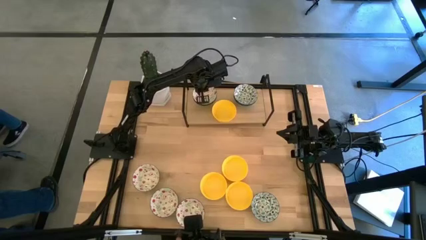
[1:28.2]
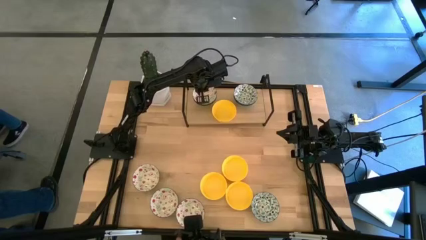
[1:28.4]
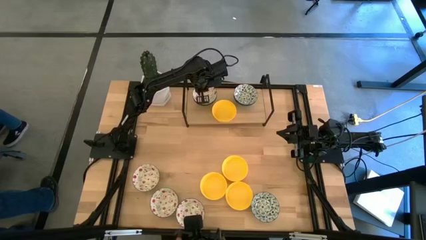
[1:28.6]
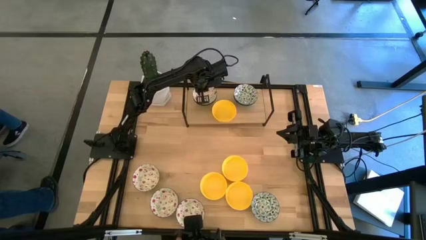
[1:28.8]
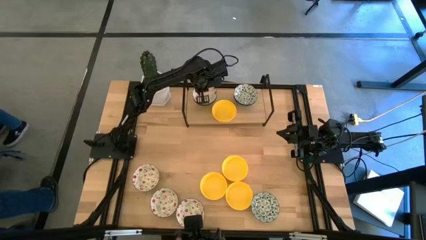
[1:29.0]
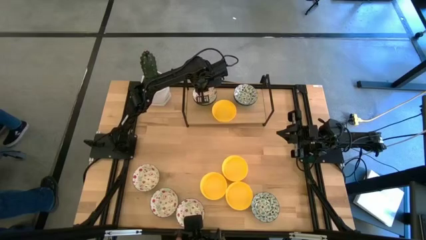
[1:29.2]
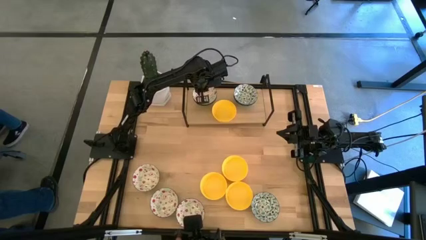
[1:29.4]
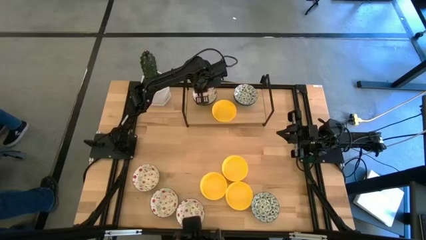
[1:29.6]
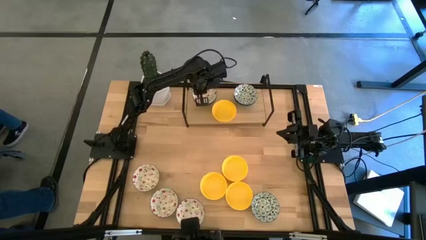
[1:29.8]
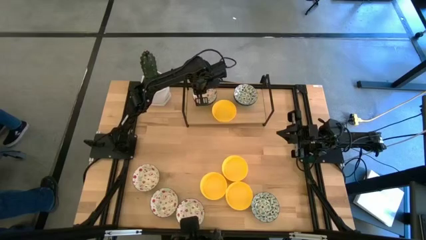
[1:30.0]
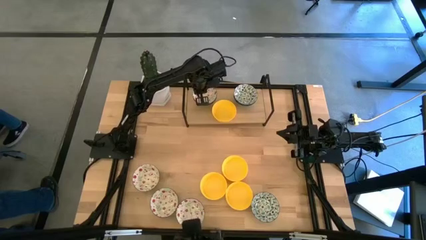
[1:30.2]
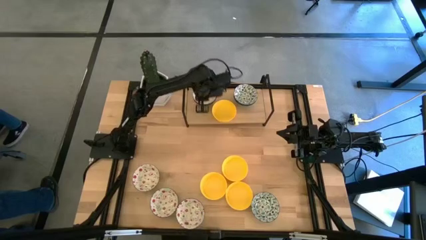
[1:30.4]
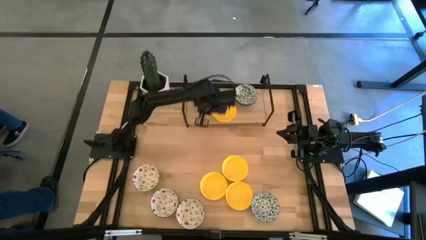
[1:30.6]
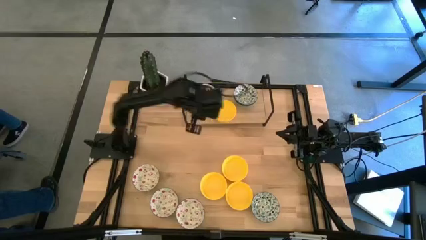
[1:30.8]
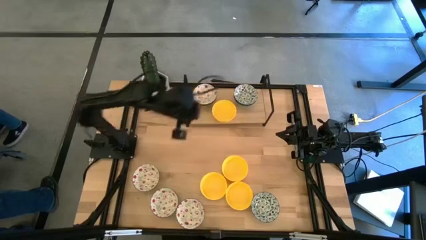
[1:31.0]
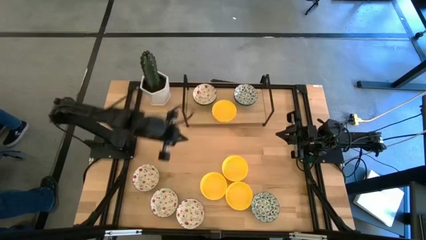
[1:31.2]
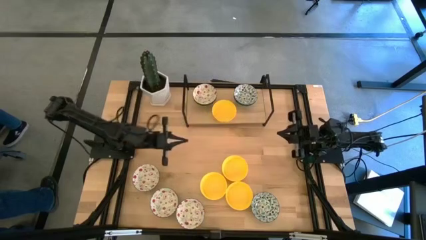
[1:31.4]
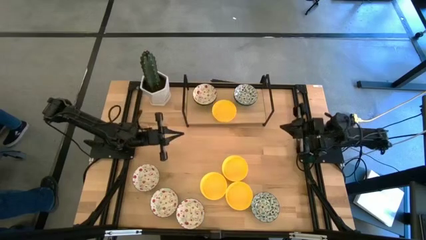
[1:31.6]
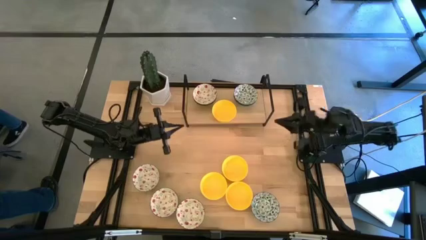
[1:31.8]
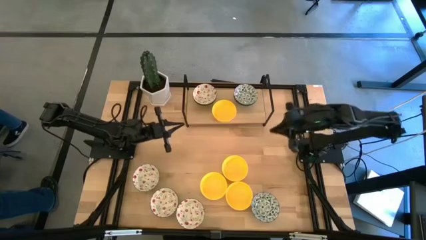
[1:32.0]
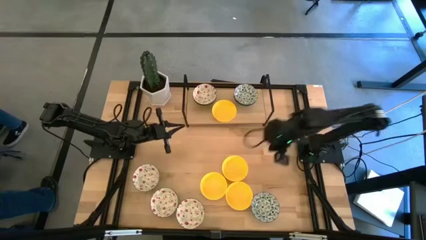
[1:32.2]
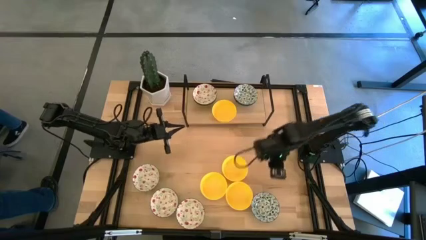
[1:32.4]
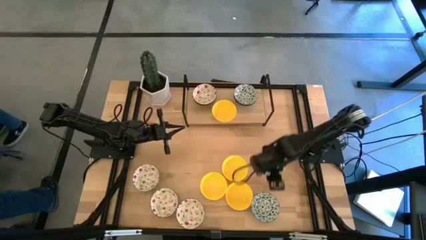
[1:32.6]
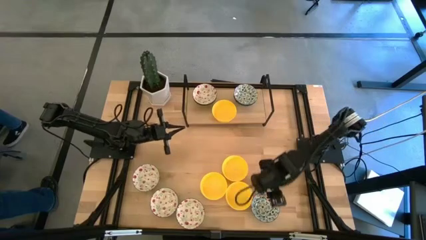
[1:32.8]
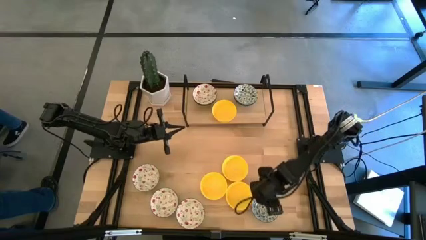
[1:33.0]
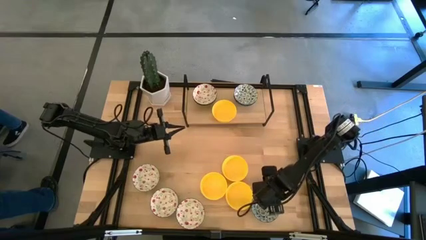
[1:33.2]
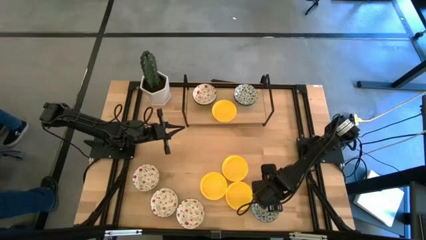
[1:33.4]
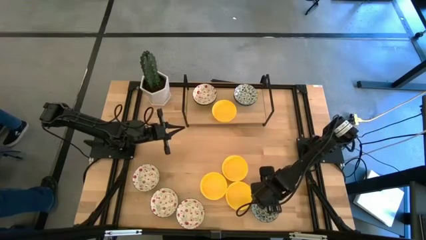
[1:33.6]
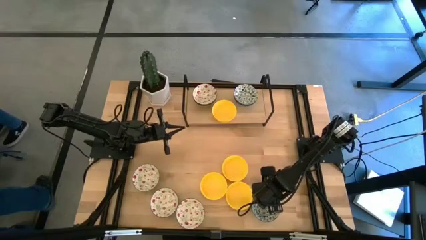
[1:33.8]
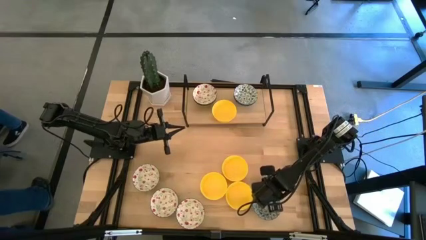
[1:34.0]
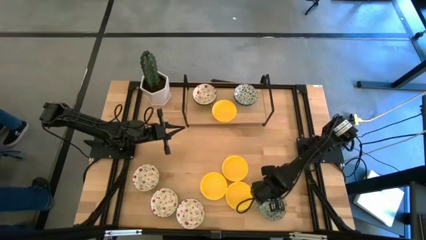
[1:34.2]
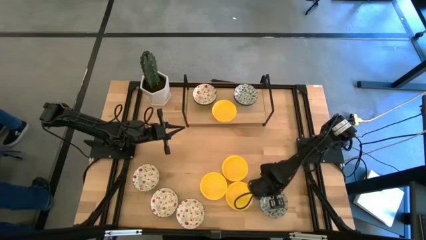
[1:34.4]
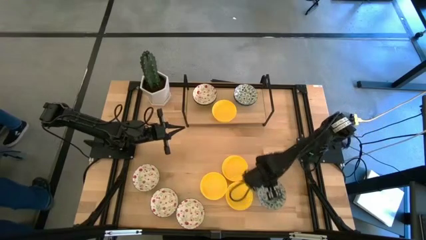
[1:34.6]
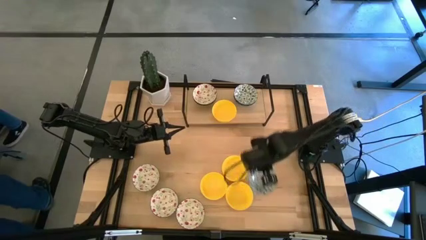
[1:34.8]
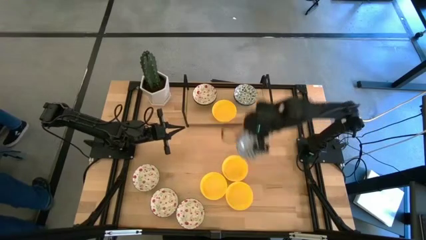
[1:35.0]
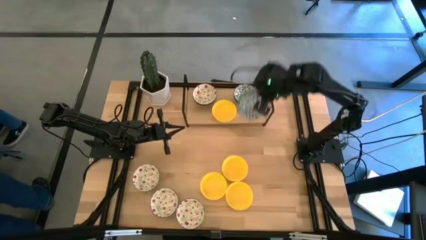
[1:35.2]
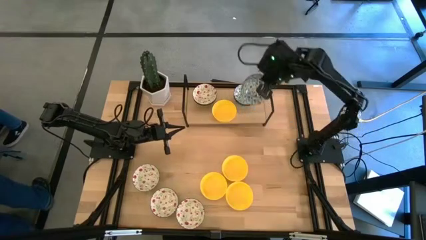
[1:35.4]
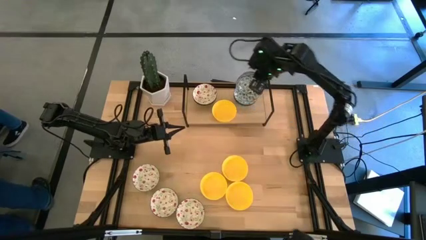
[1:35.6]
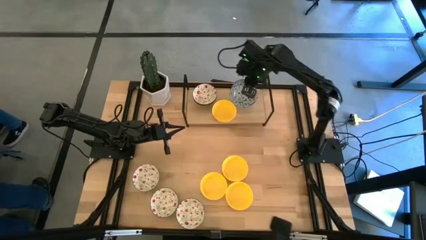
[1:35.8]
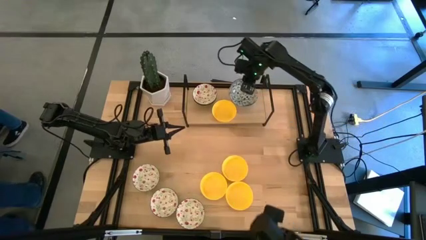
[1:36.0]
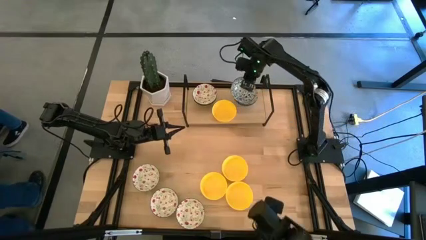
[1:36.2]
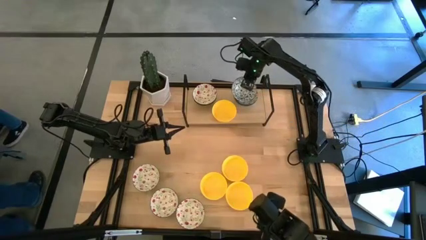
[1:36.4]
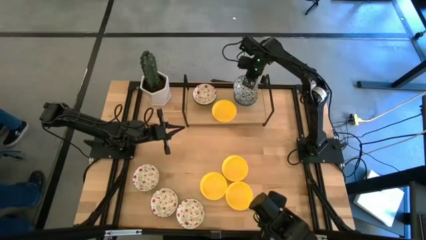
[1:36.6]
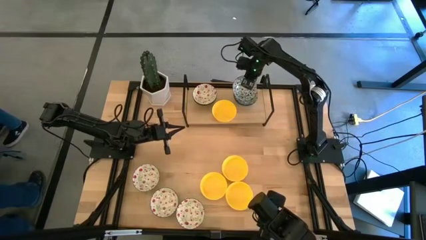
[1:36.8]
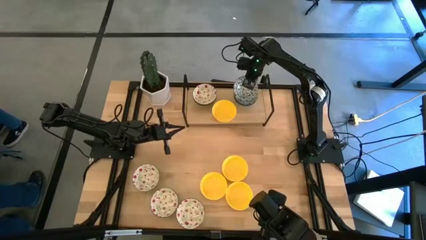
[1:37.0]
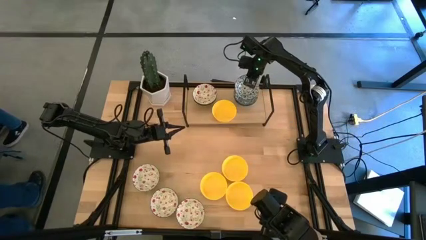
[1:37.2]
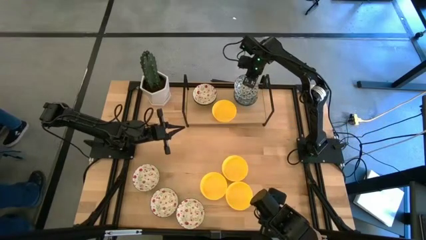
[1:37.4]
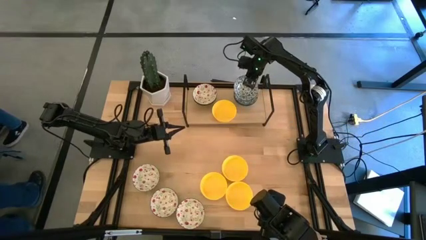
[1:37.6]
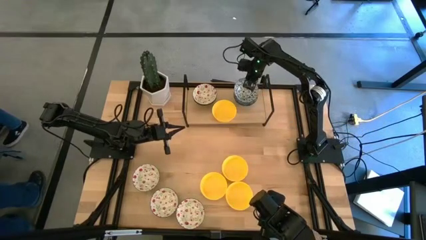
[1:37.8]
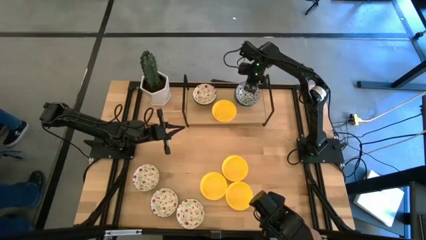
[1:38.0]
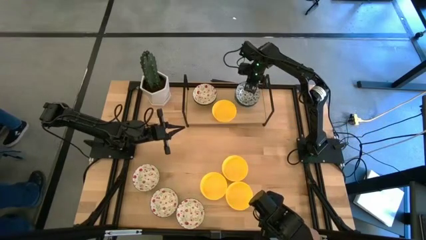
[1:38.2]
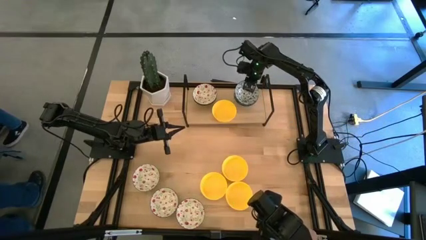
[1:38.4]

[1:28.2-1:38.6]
Task: Pick & Place Mini bowls
Stack the blue bowl on top of the blue bowls on the shelf

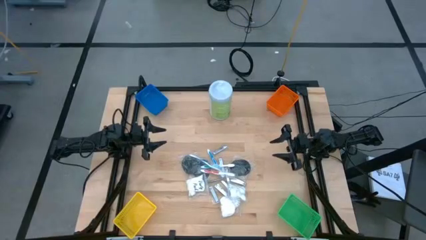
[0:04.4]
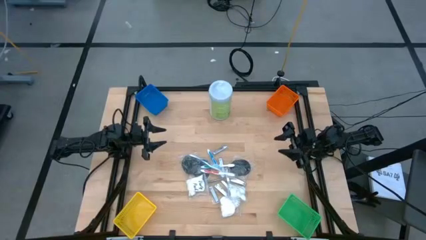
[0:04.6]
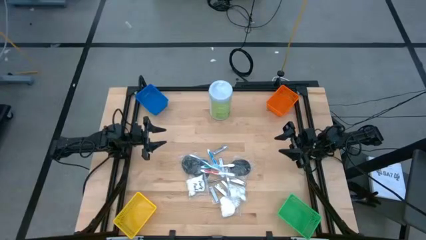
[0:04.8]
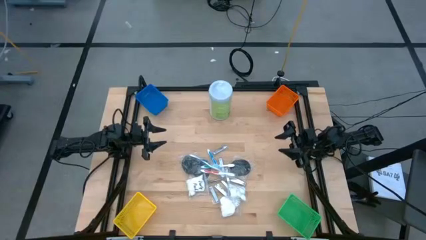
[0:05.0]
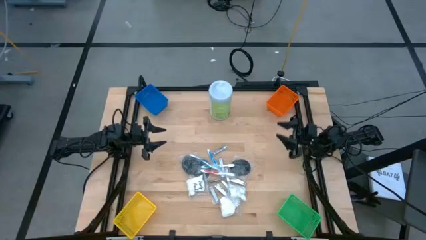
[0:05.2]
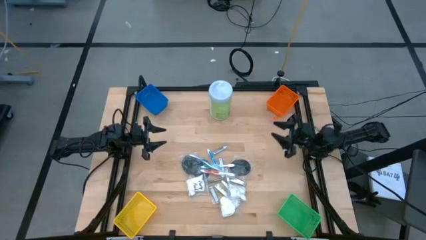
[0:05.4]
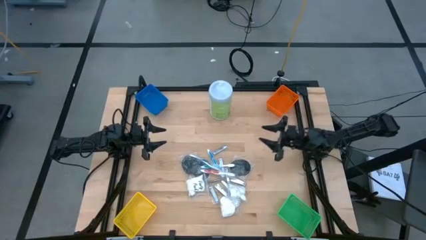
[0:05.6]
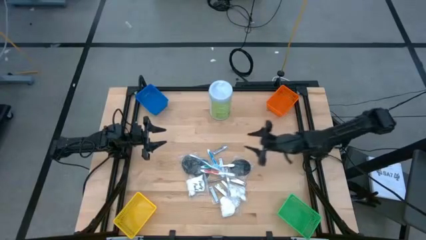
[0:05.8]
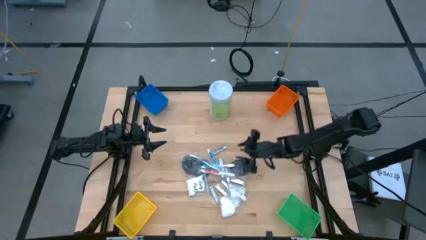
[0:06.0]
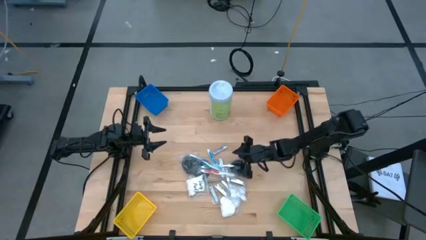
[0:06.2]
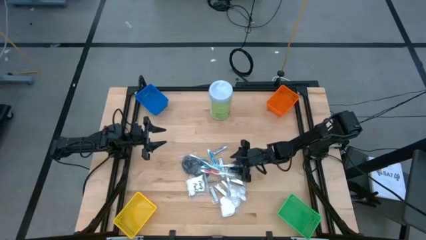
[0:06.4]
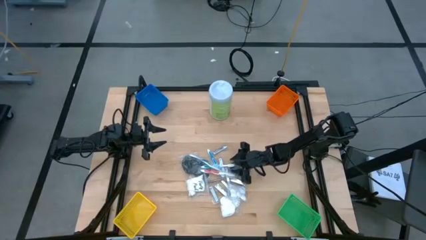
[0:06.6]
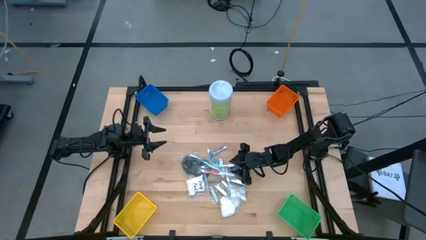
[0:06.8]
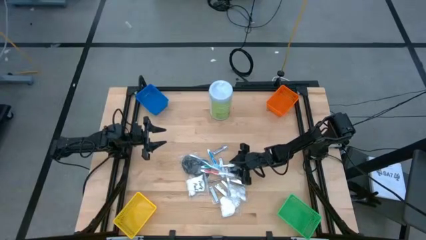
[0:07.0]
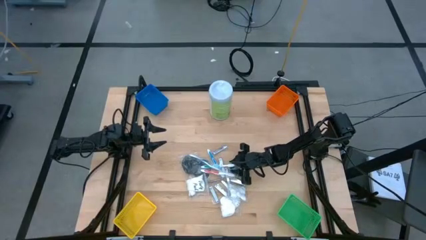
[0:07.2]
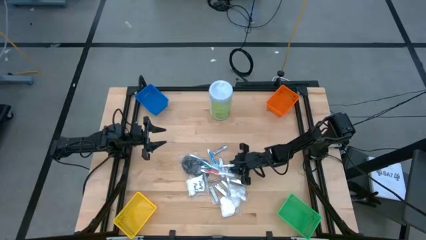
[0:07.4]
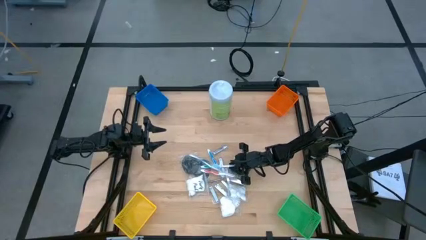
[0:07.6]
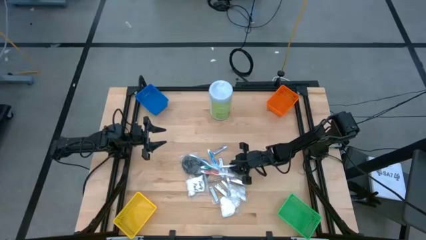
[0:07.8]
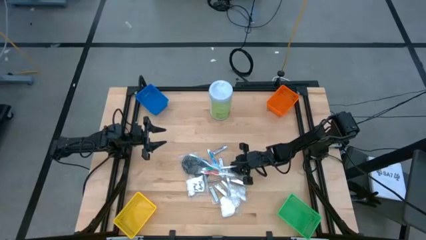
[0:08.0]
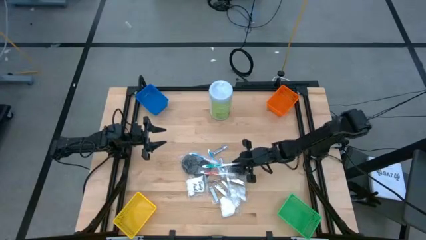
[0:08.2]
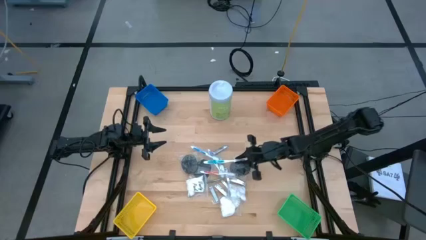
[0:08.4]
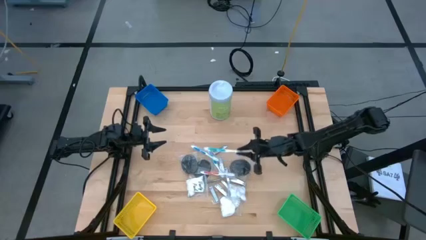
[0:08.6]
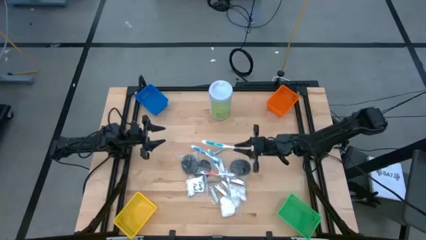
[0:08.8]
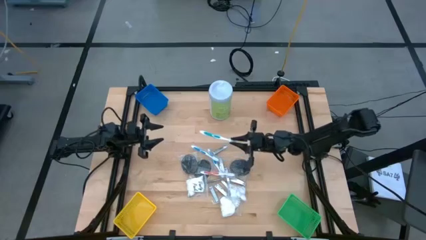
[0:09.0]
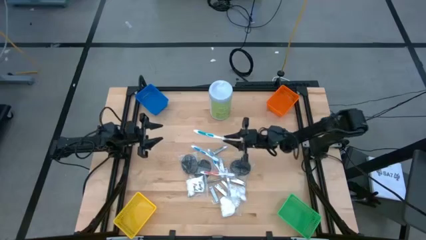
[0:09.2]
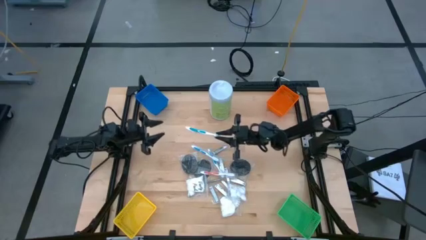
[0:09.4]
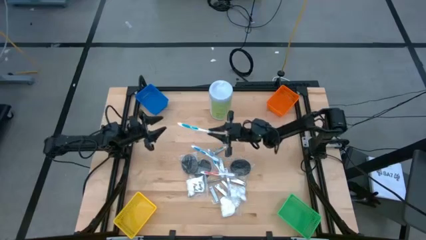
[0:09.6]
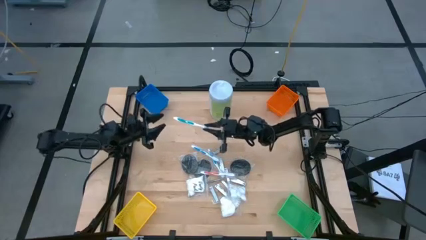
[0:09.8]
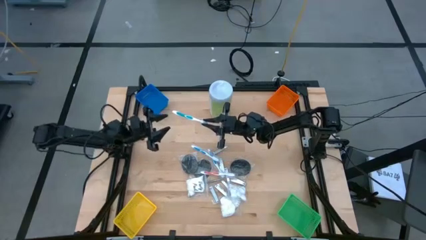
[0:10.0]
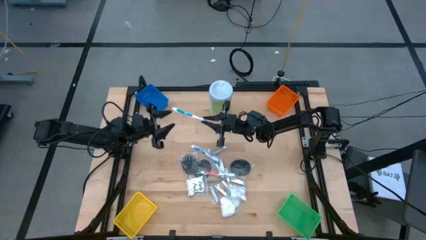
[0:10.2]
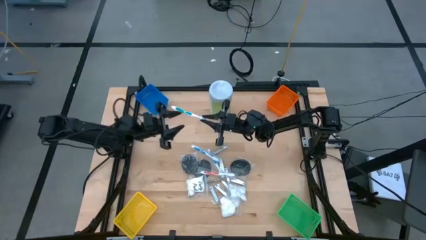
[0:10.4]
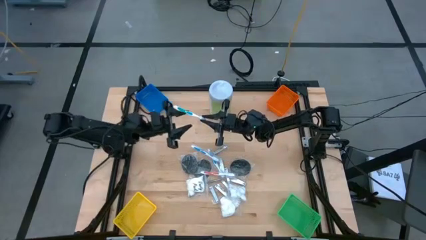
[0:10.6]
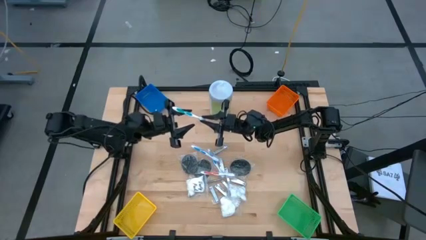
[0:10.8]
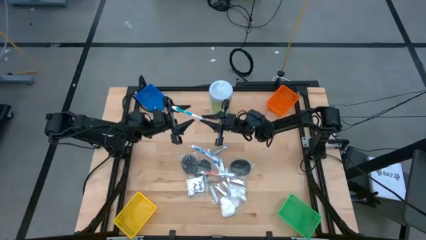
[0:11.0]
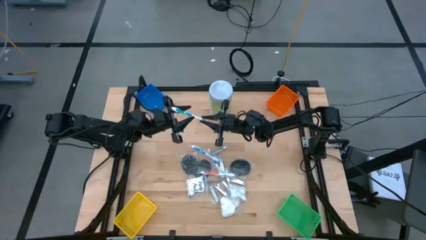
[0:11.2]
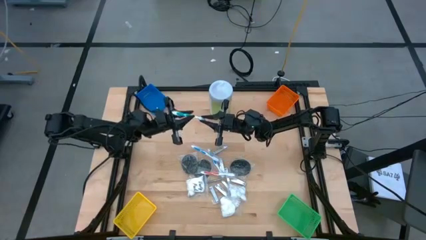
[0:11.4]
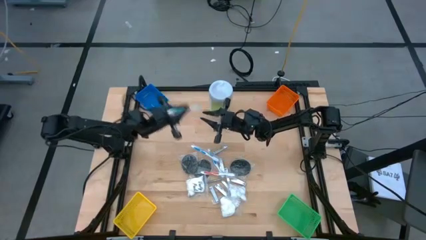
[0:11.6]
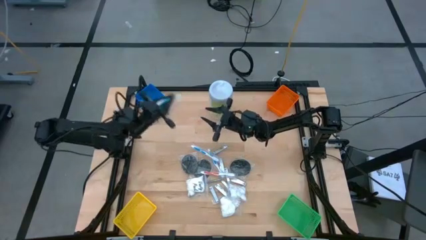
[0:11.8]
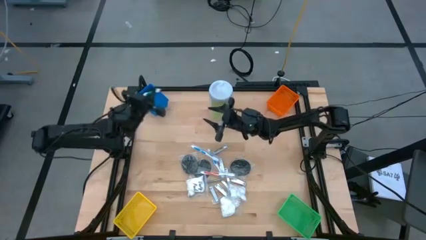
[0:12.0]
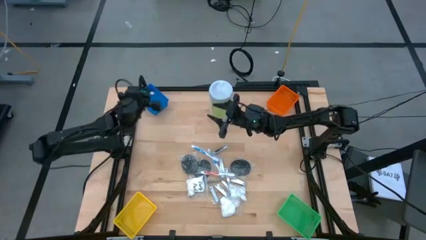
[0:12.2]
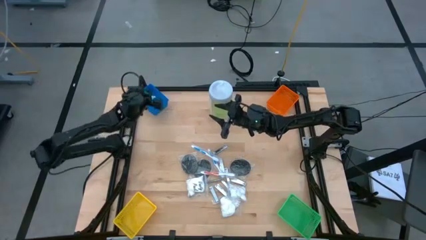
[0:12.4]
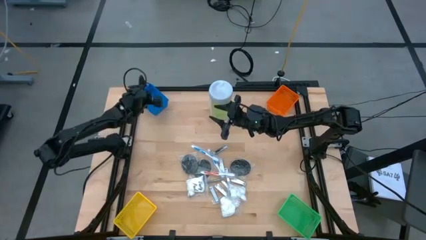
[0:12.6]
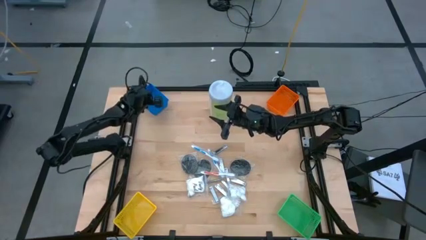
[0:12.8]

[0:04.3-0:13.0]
Task: Pick & Place Travel size toiletries
Put the blue toothbrush into the blue bin
